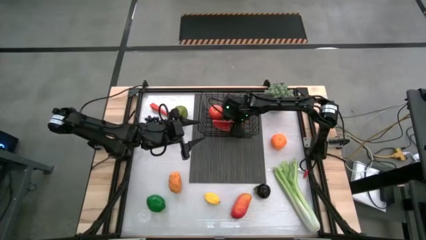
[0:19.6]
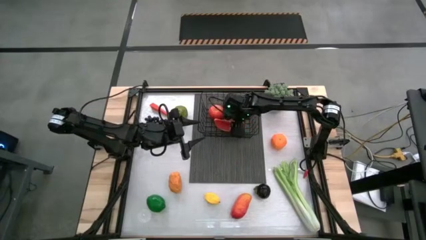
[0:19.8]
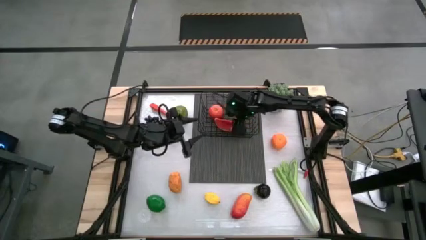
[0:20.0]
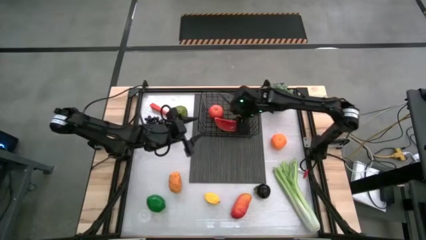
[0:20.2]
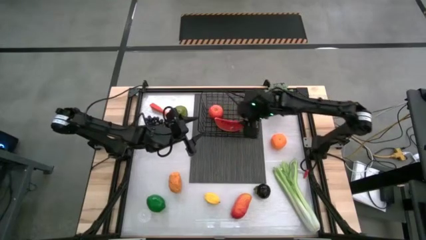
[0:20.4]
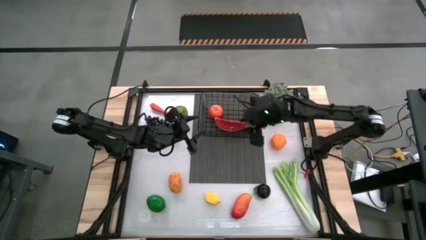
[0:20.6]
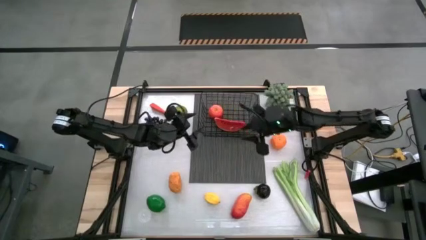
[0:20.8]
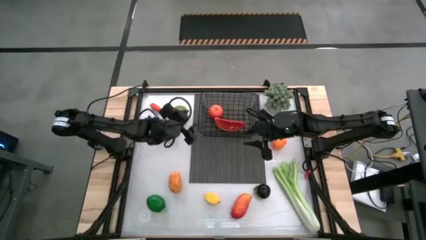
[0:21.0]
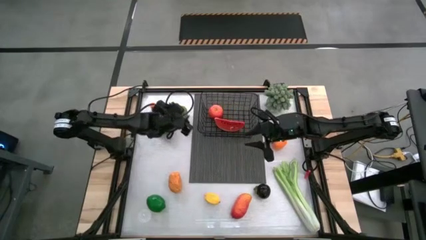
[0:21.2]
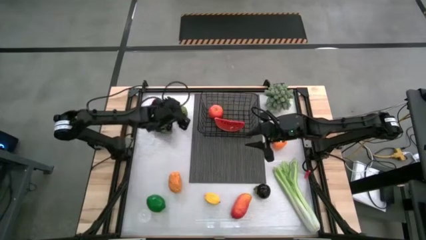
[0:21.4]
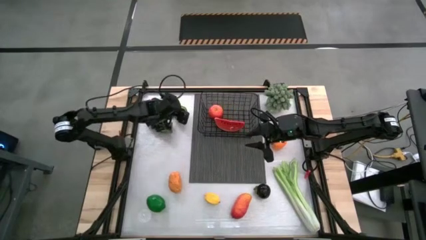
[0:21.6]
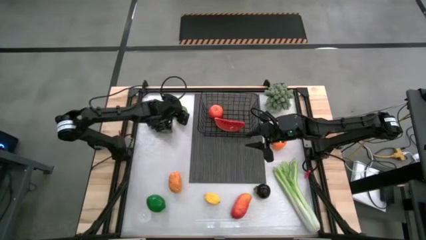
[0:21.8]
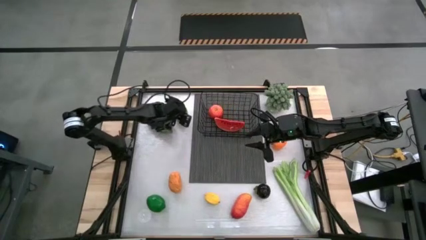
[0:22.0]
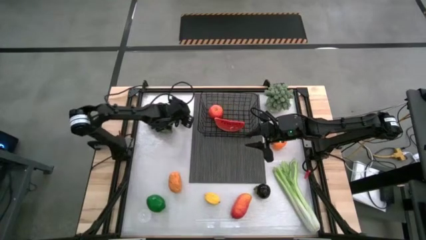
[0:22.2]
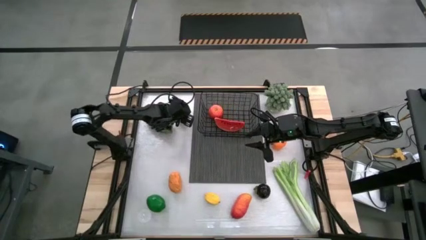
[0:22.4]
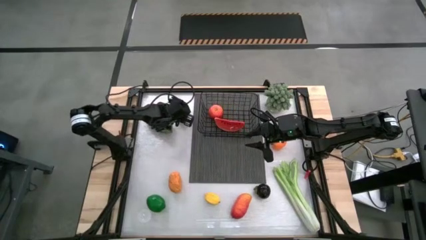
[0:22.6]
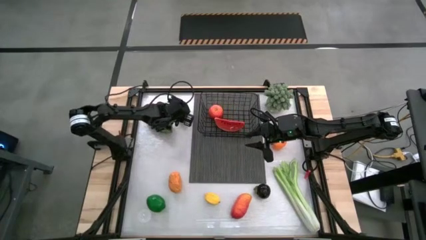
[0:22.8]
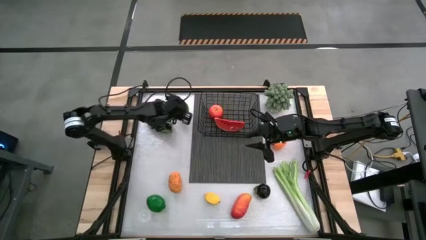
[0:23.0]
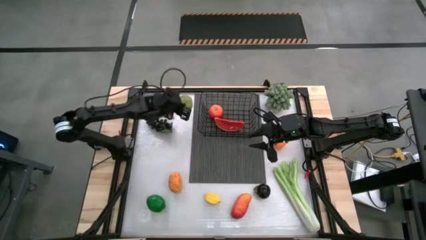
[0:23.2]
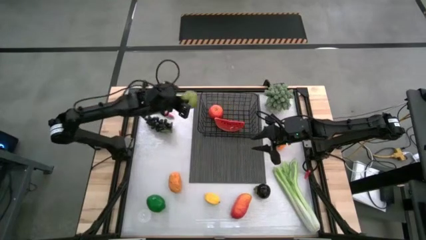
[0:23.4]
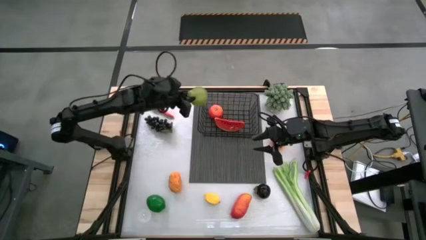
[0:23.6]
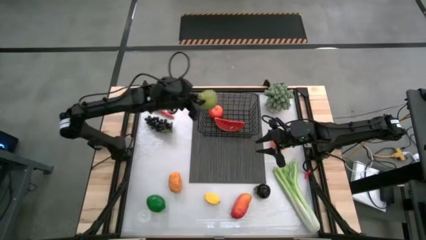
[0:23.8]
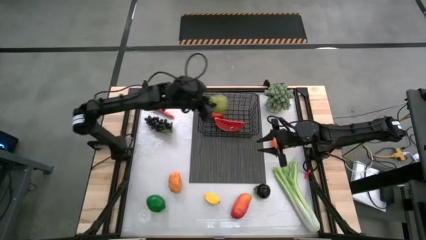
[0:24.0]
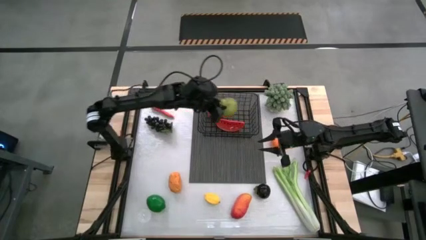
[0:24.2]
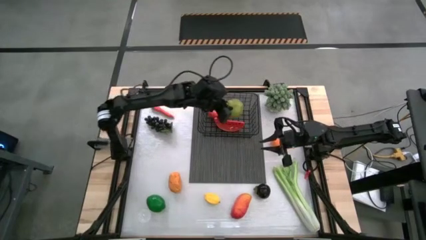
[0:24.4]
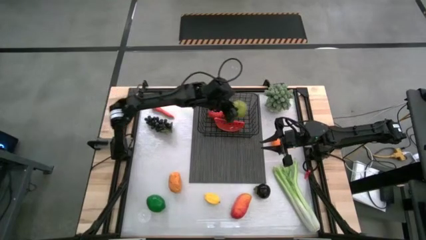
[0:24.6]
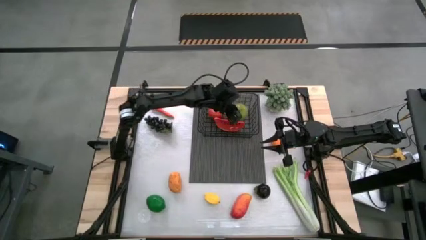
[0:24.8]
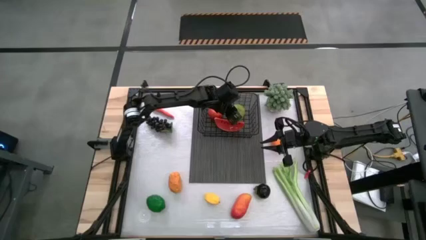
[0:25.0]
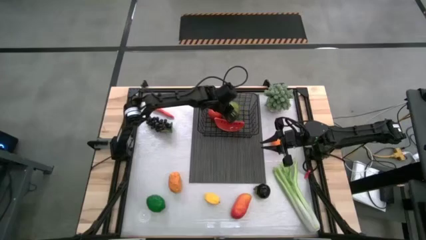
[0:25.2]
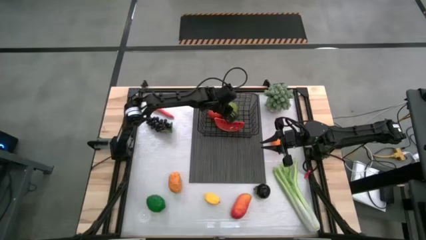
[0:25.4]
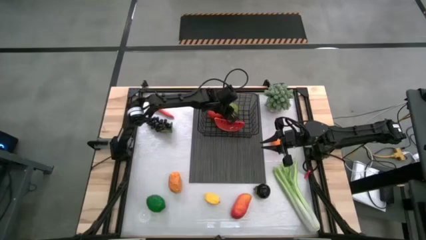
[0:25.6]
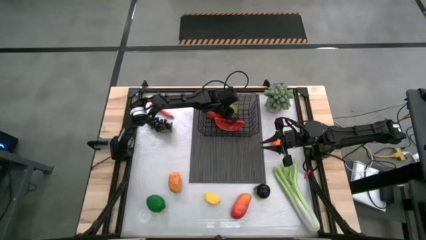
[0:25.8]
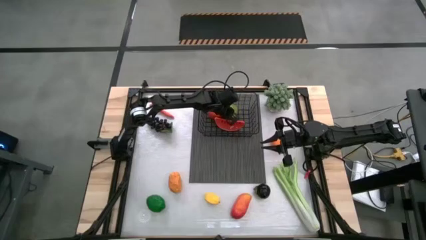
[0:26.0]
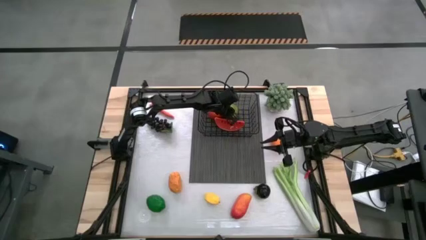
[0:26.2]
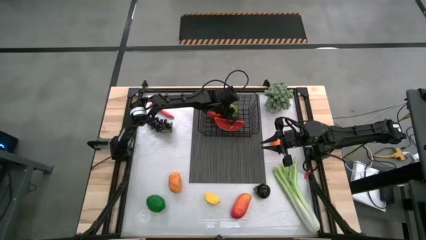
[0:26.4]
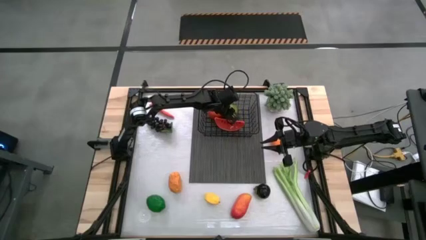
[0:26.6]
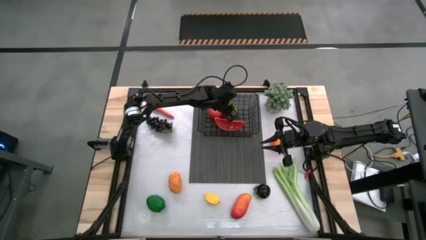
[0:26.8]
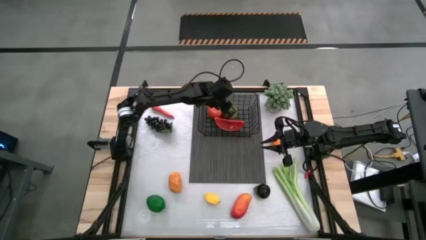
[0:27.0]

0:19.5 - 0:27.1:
Task: Build produce basket
Put the pear into the wire basket

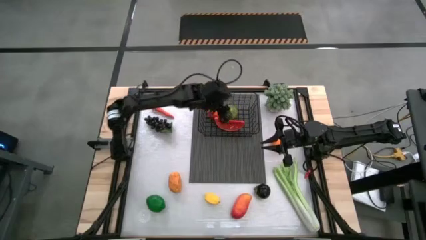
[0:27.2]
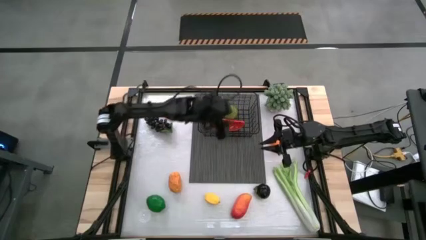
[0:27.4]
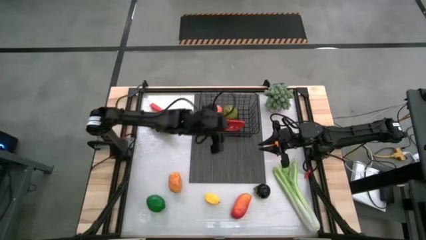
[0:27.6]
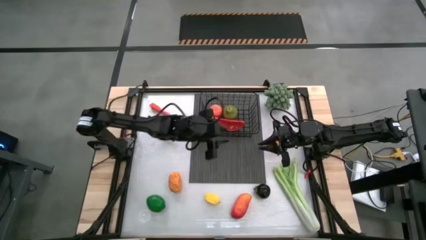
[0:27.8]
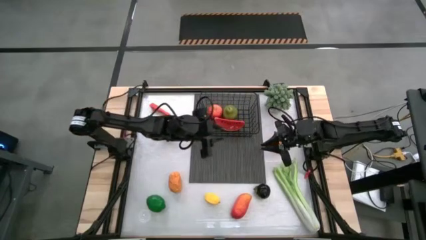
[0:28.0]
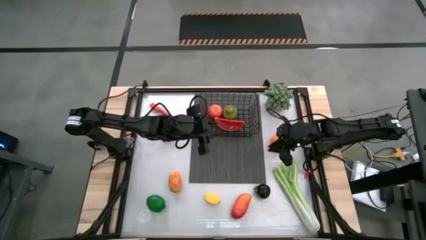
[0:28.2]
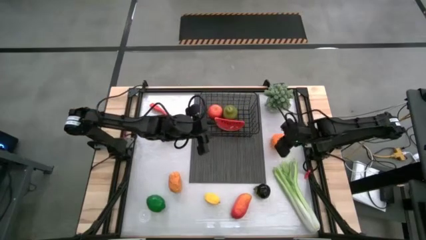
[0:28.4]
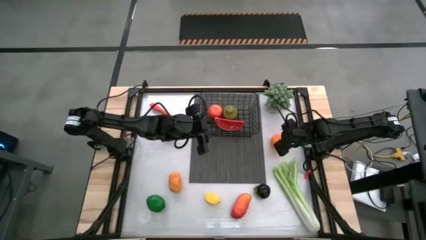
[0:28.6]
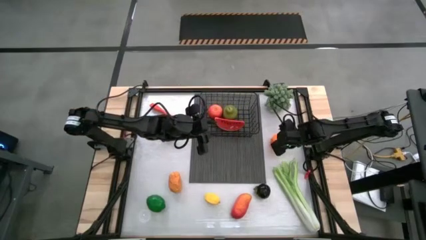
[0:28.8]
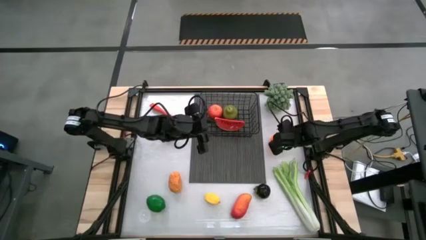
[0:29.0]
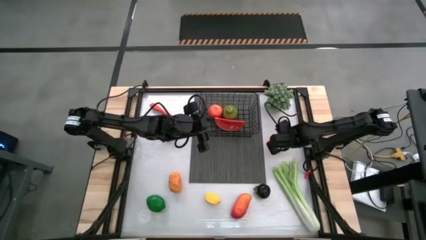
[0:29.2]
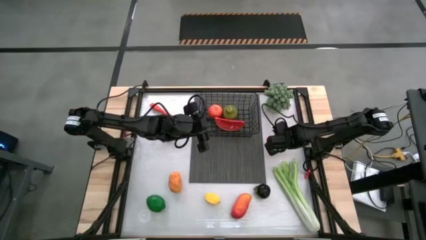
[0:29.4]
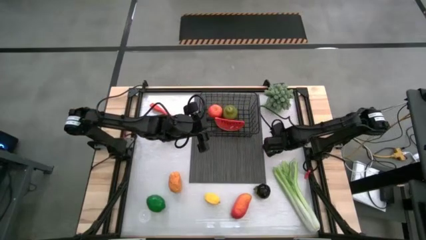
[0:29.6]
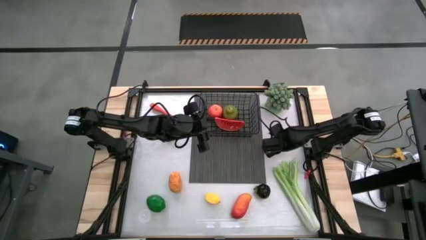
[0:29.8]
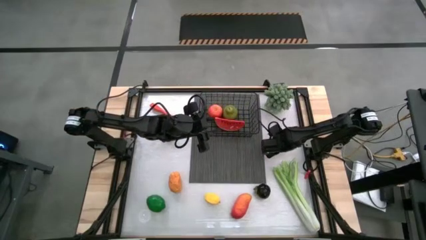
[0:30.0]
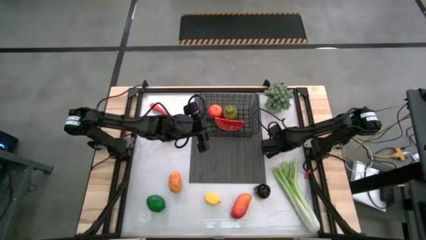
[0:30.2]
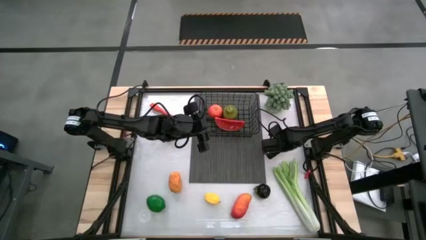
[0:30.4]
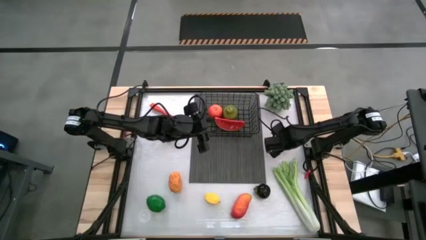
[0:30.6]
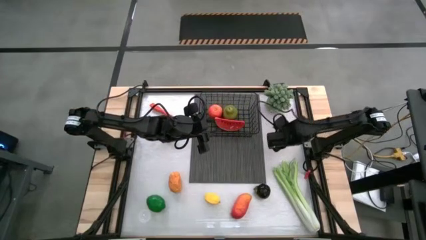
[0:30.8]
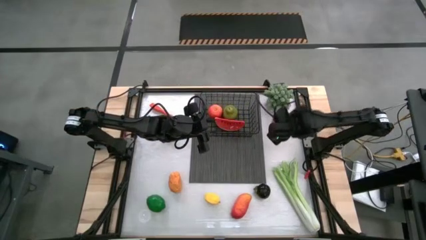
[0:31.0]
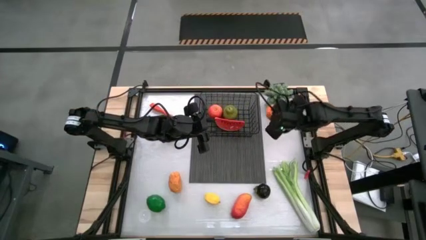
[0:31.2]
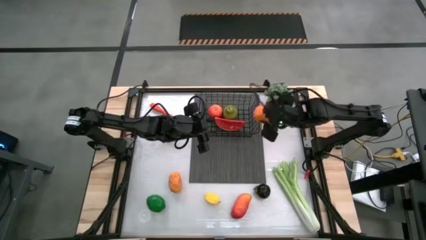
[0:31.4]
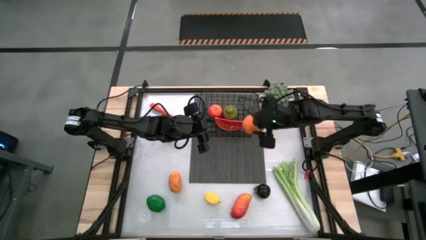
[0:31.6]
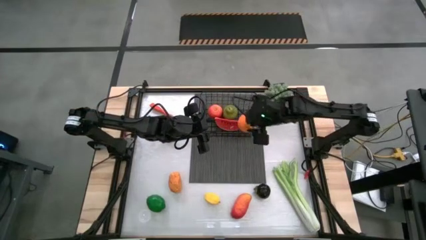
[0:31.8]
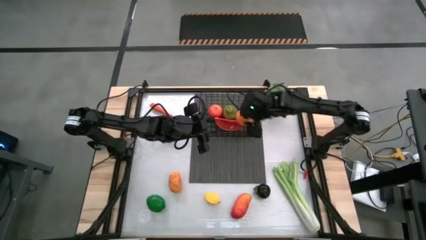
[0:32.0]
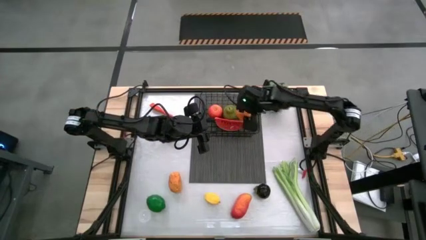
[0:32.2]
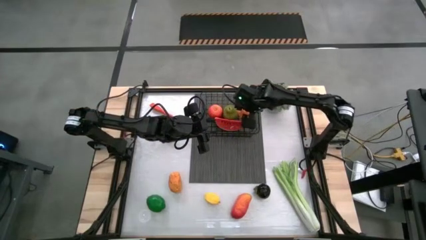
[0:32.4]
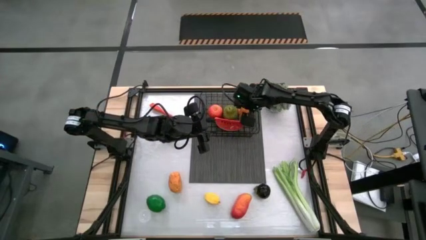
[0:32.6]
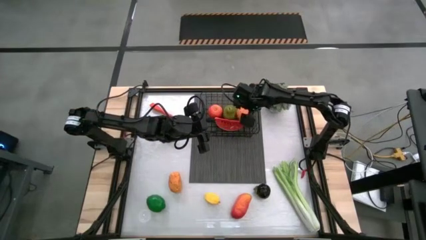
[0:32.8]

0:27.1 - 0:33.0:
Put the orange into the wire basket

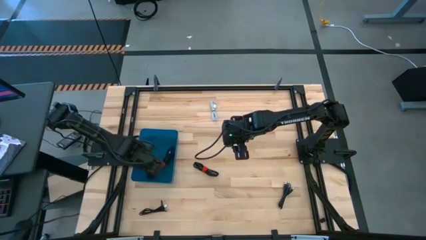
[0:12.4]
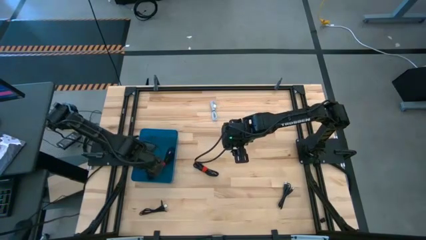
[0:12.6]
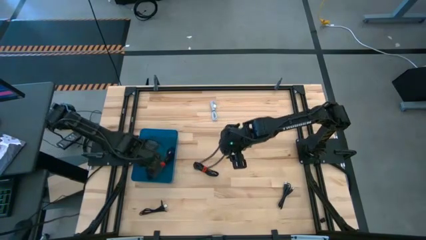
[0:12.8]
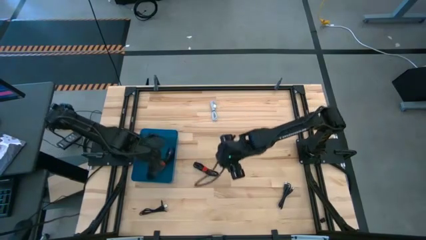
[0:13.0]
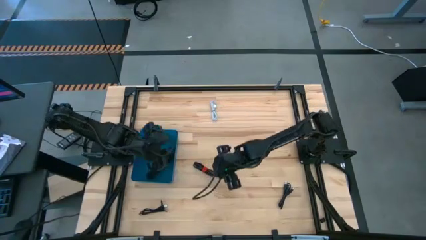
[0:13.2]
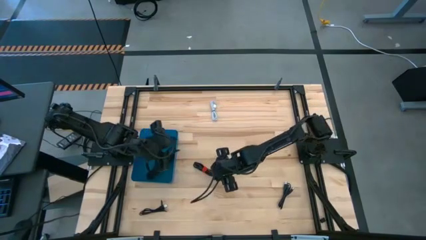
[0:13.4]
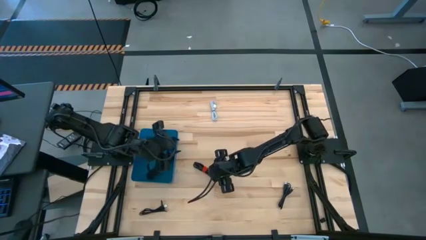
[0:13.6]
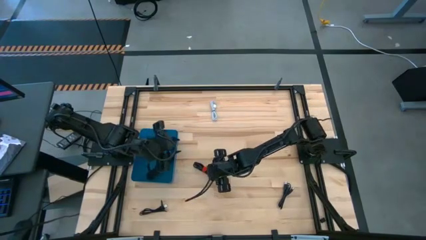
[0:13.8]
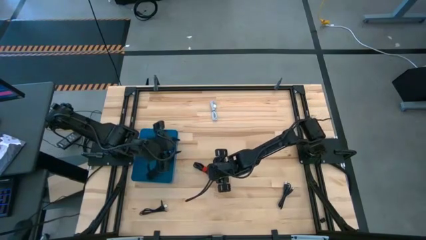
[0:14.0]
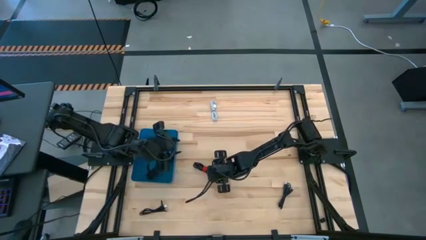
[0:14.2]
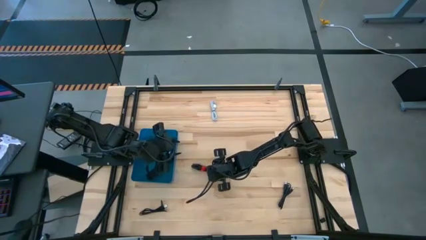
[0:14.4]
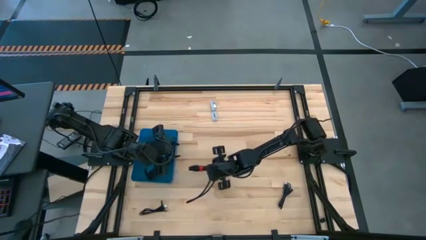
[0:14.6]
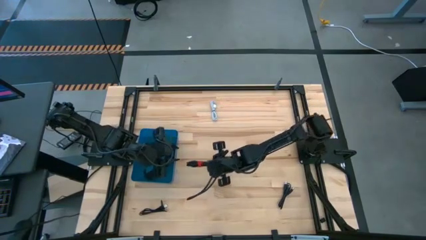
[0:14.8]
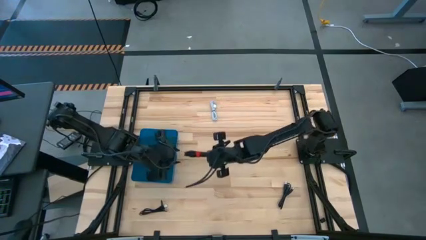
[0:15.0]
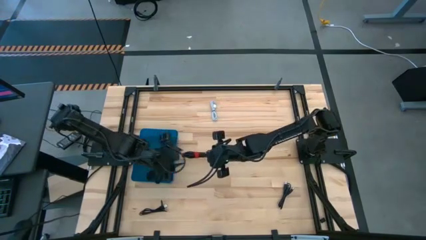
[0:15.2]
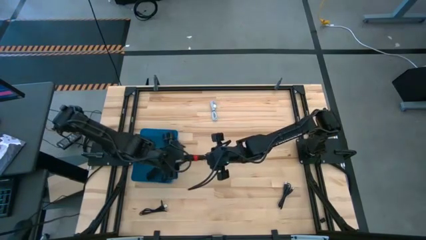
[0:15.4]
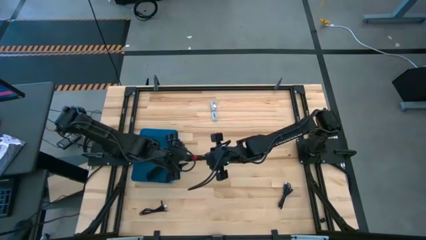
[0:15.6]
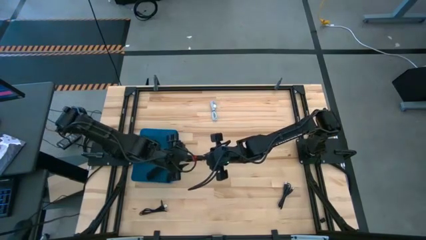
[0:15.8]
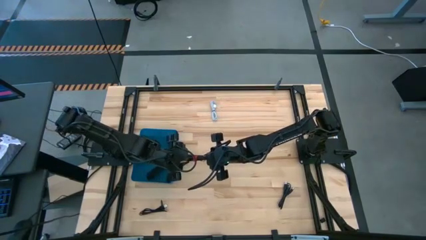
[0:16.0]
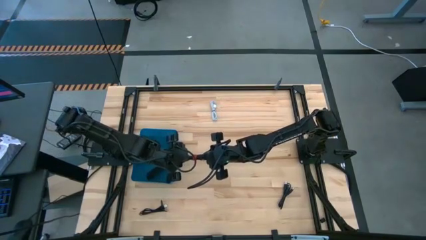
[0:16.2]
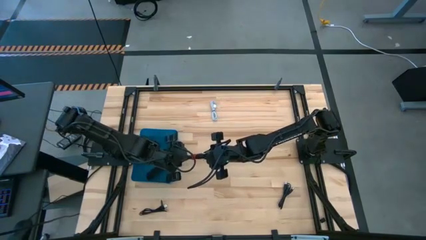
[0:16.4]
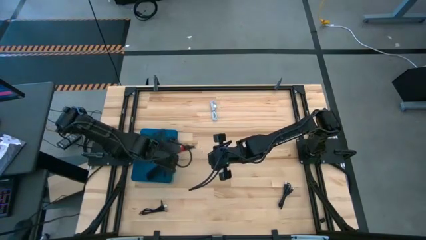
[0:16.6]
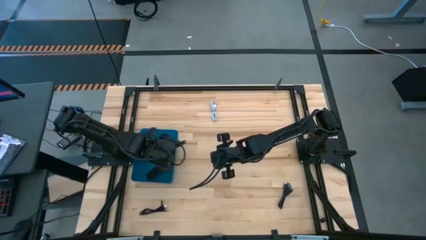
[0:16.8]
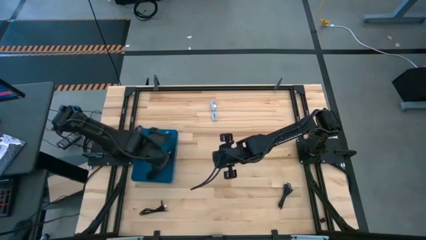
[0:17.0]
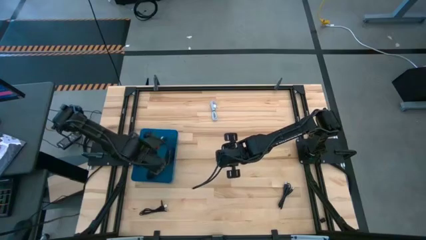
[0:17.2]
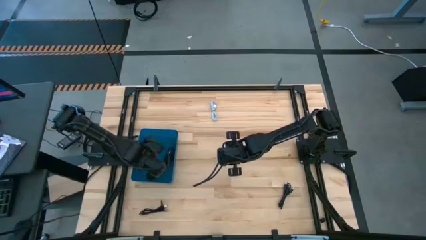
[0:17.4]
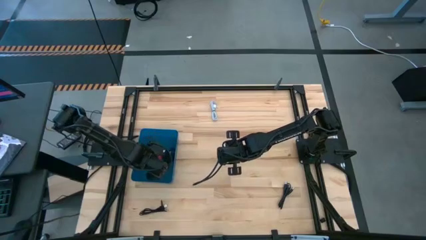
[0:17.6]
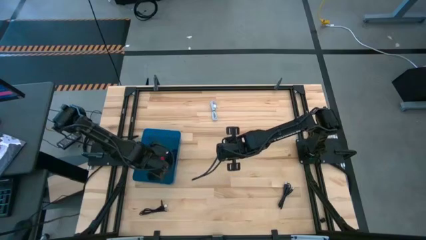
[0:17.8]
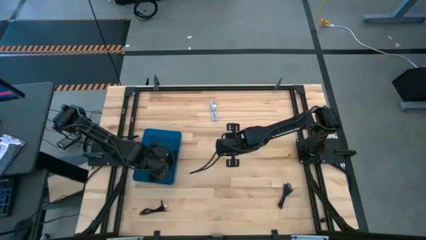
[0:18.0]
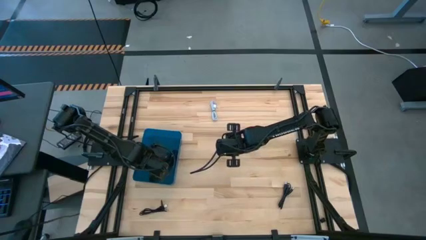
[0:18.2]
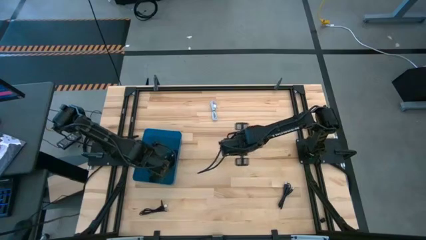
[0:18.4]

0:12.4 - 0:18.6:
Task: Pick and place USB-C Cables
Put the middle black charger cable into the blue bin
